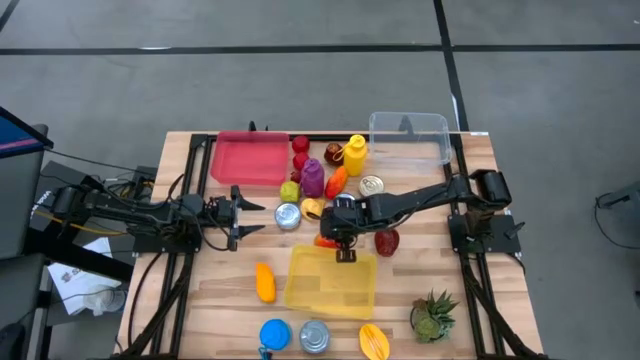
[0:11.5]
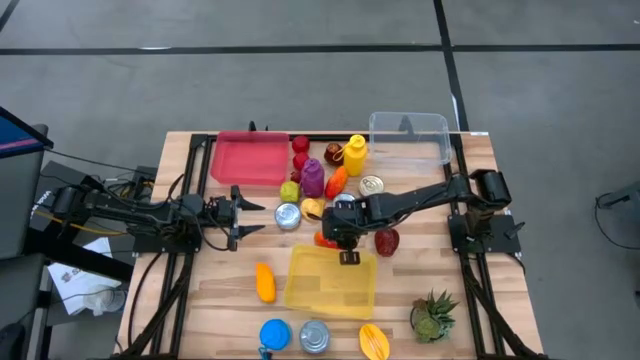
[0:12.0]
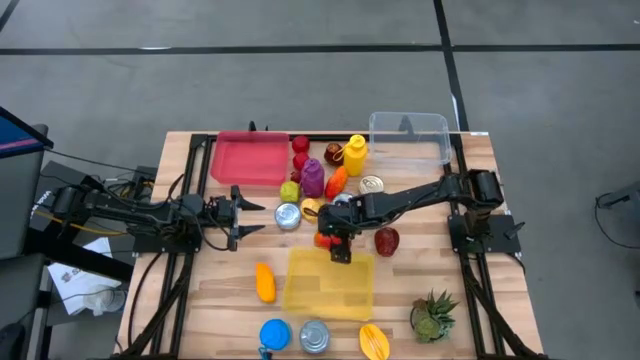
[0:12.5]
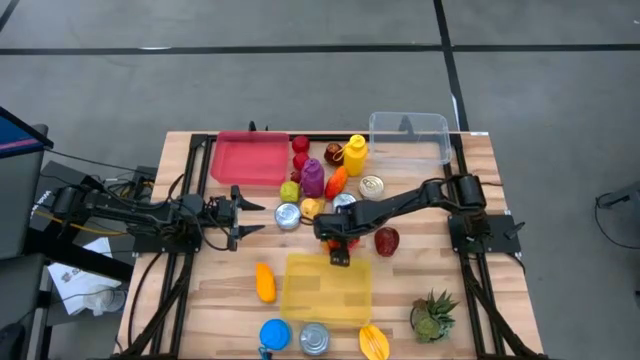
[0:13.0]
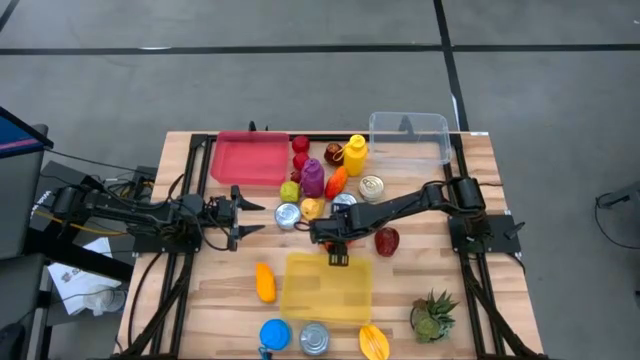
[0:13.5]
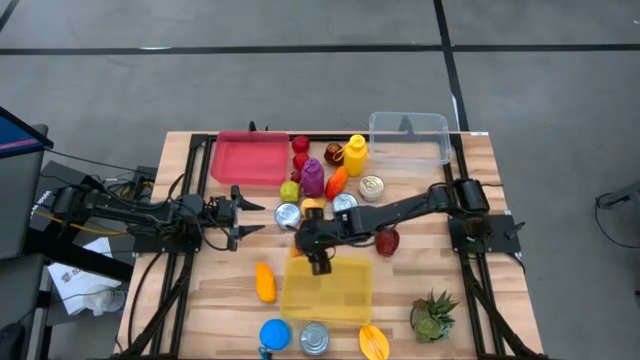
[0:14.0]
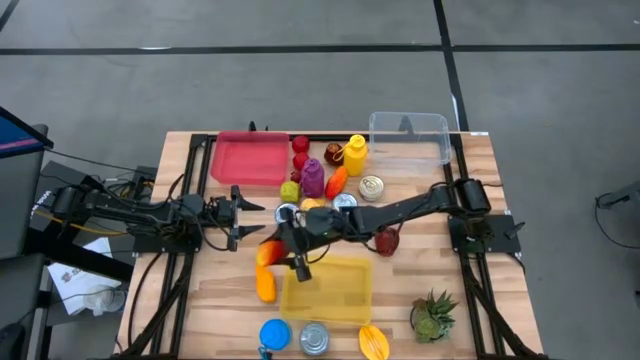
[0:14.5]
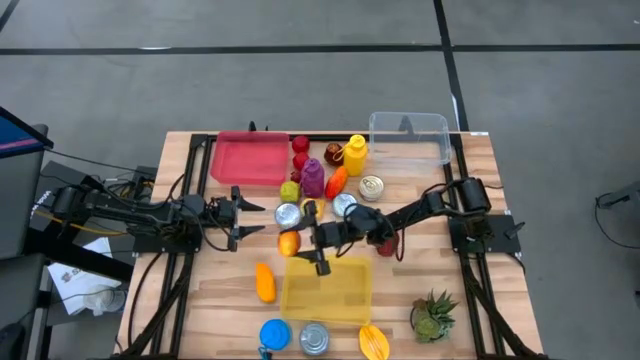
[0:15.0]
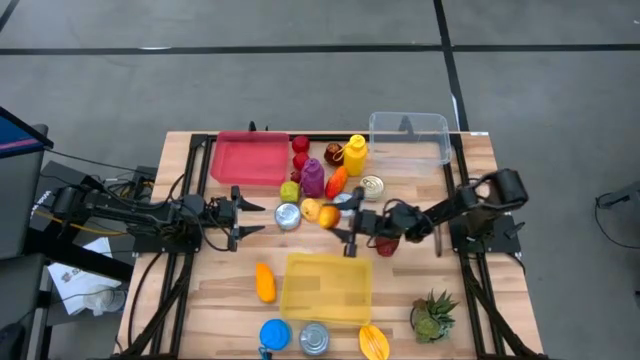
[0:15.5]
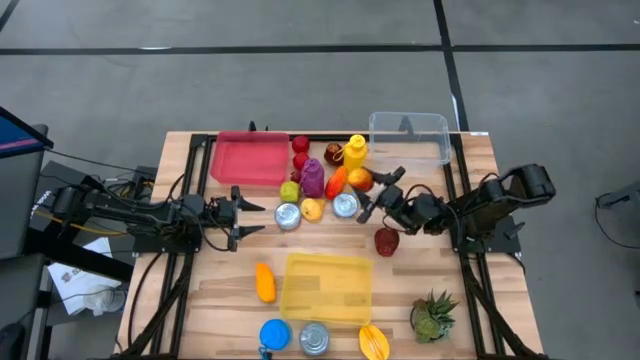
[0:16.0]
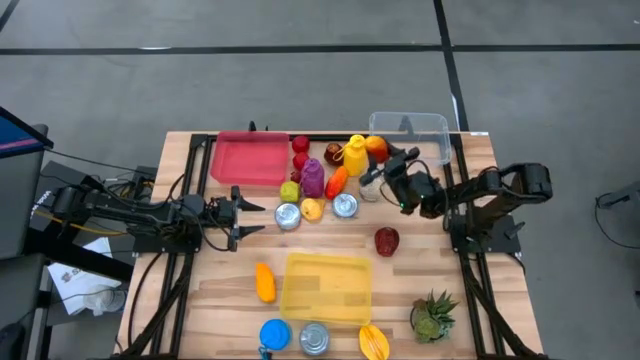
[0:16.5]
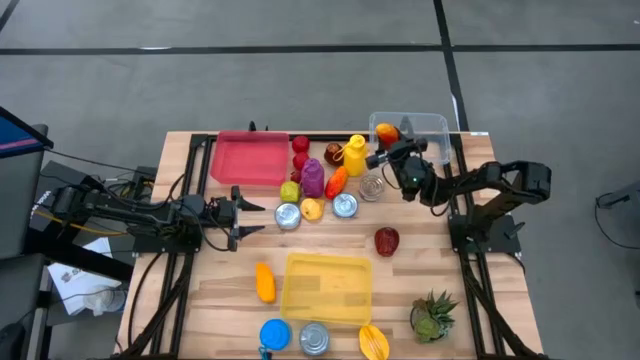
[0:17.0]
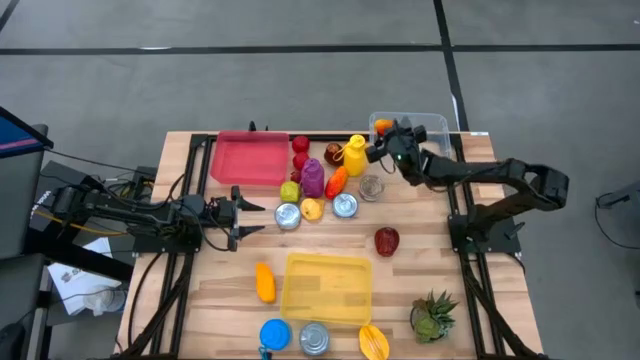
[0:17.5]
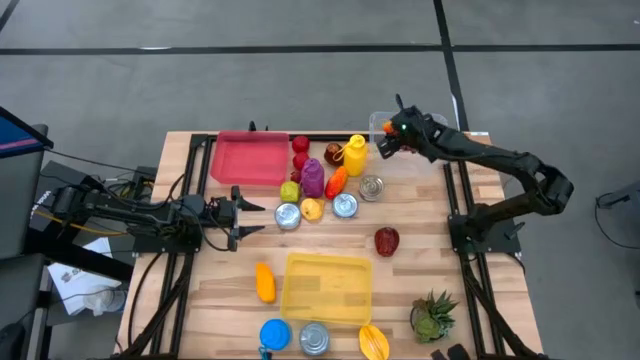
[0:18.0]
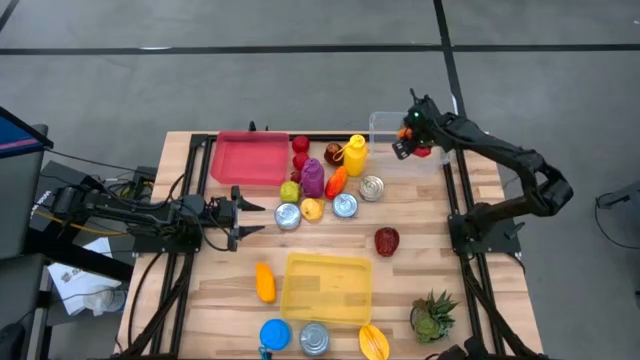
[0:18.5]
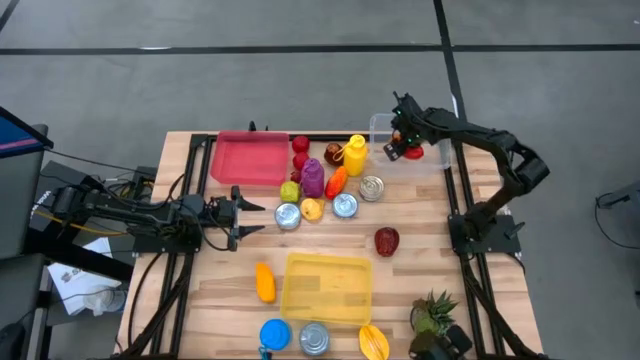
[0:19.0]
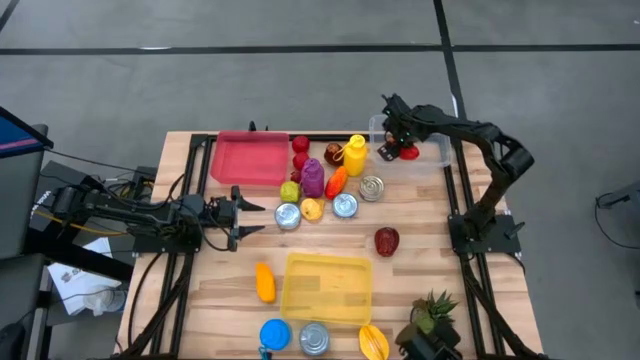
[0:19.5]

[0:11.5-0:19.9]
Task: Pick & Place Food Item
Put the middle mango into the transparent bin

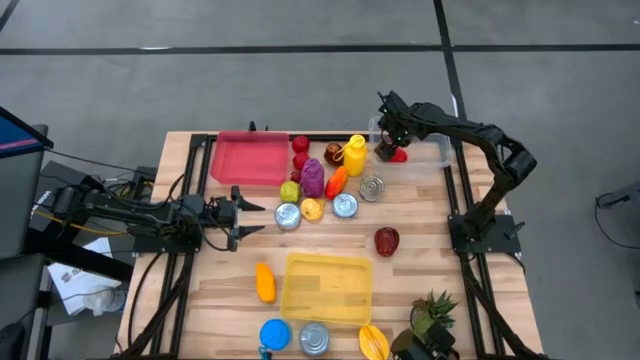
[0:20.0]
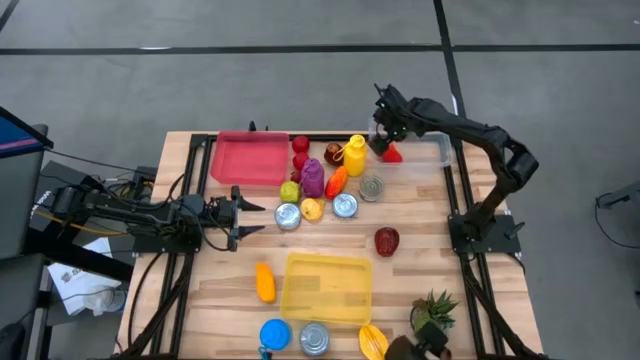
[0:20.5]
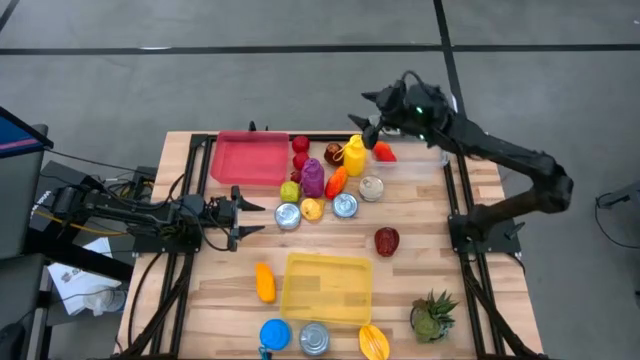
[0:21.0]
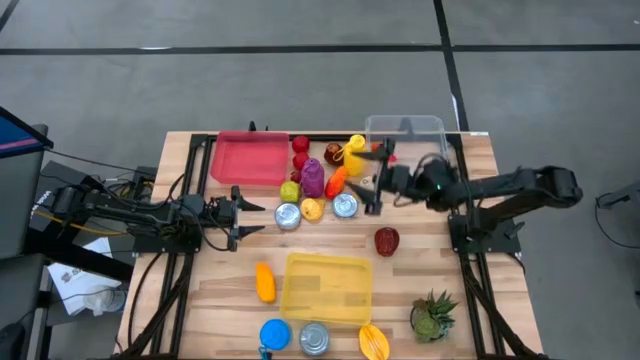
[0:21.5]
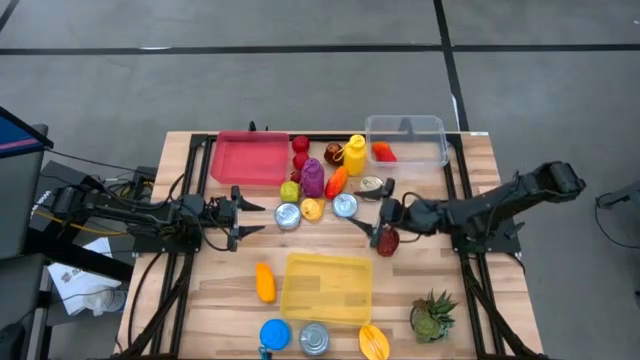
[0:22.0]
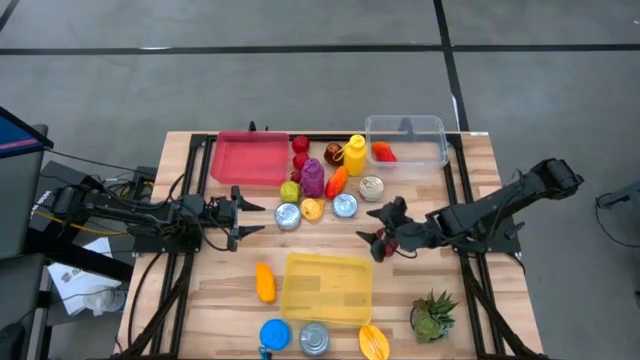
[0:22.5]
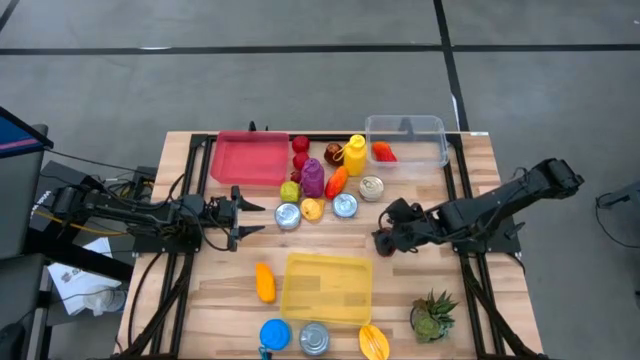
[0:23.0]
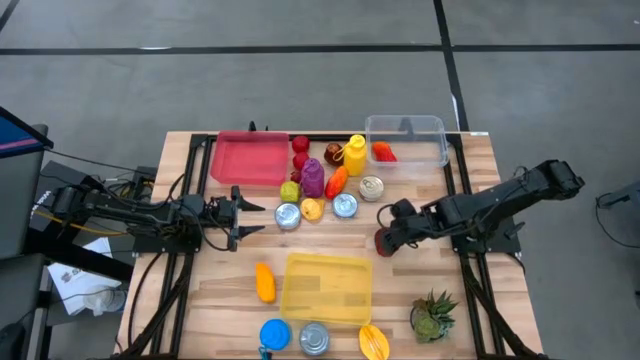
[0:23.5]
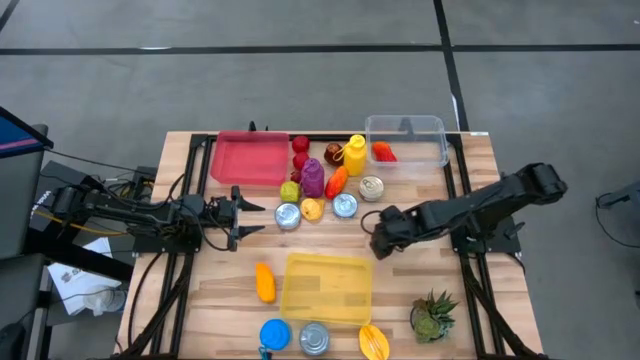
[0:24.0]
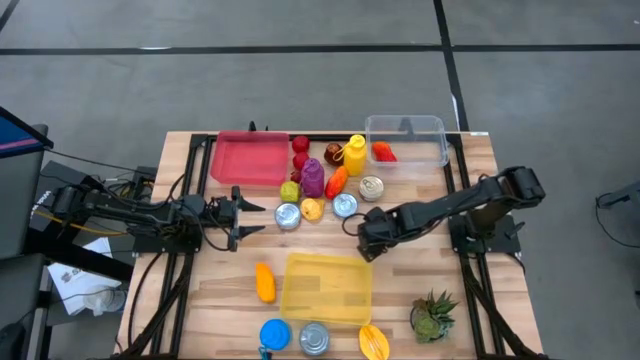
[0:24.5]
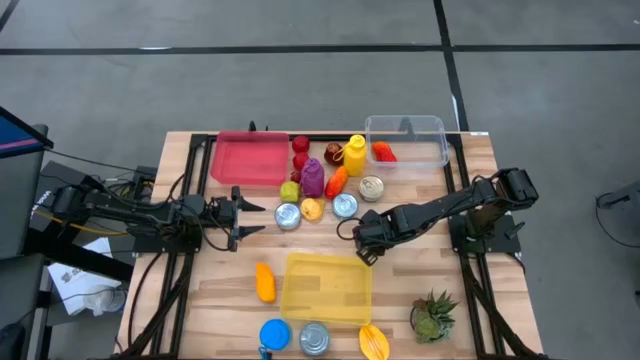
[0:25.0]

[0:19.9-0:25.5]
Put the bottom dark red apple into the transparent bin

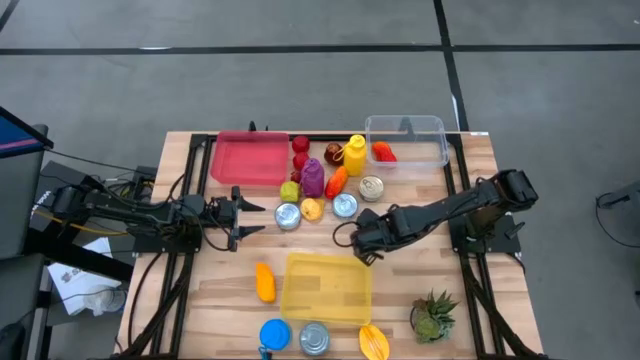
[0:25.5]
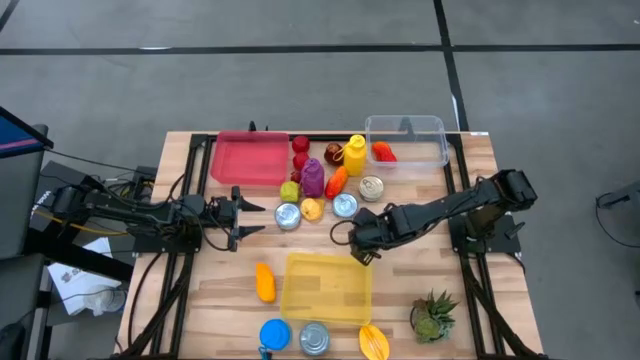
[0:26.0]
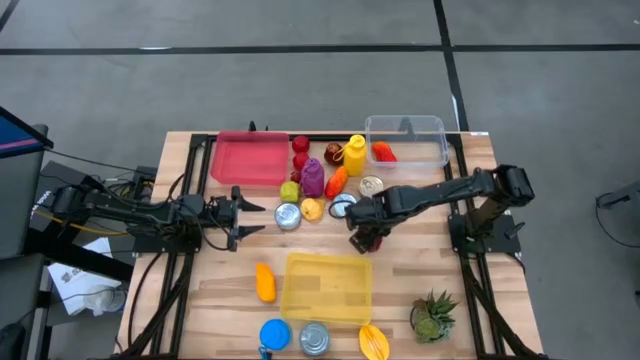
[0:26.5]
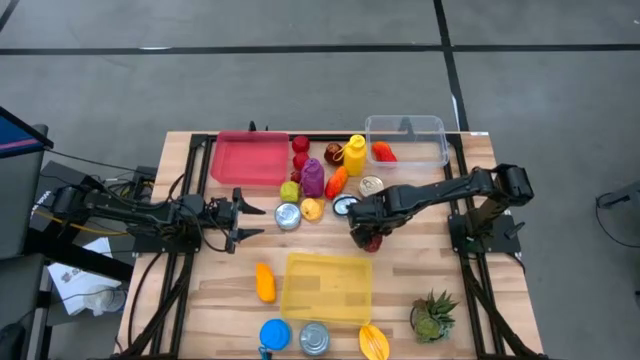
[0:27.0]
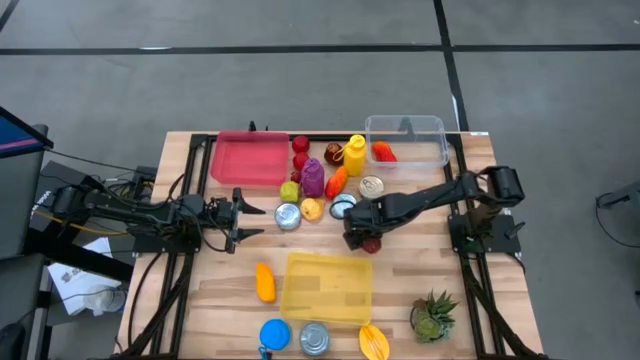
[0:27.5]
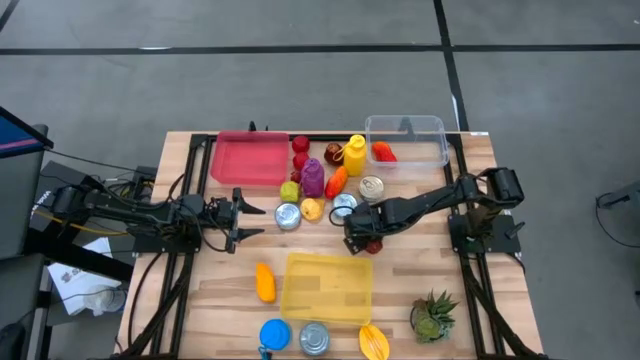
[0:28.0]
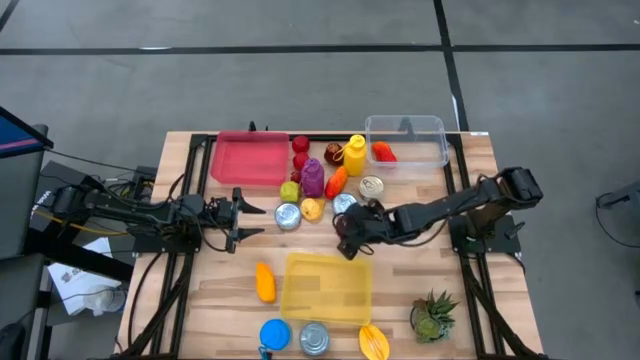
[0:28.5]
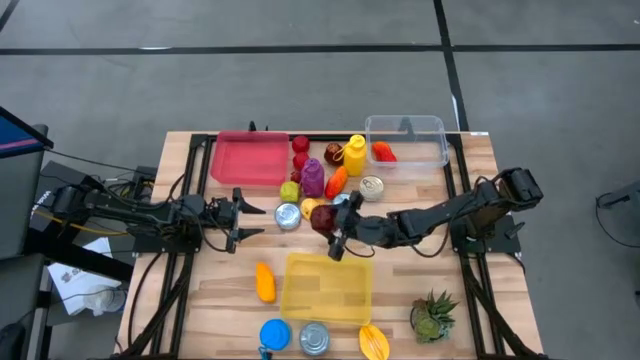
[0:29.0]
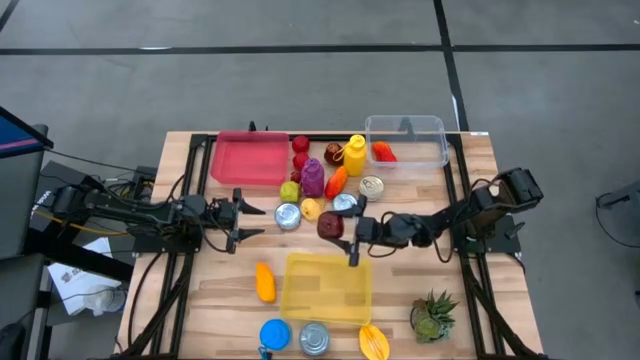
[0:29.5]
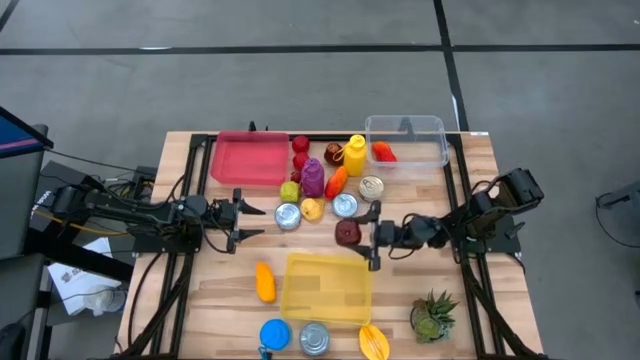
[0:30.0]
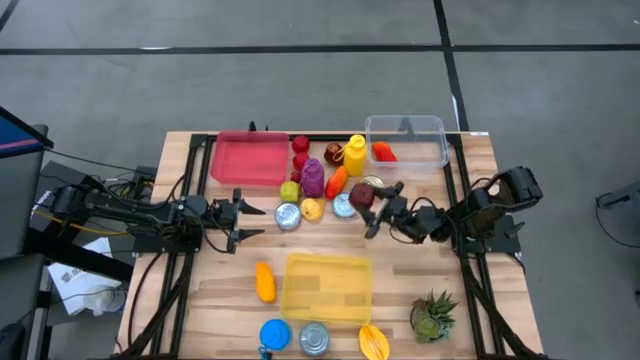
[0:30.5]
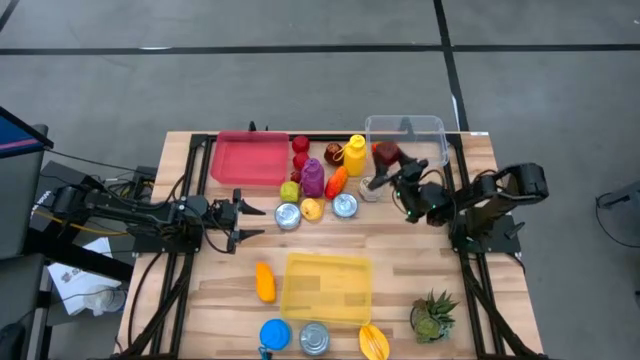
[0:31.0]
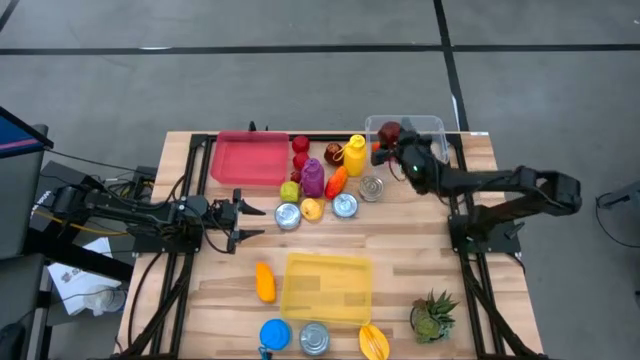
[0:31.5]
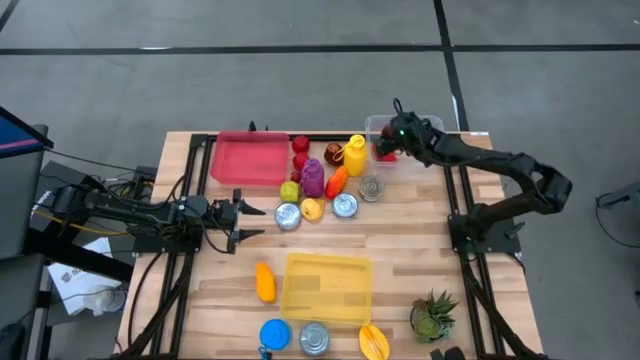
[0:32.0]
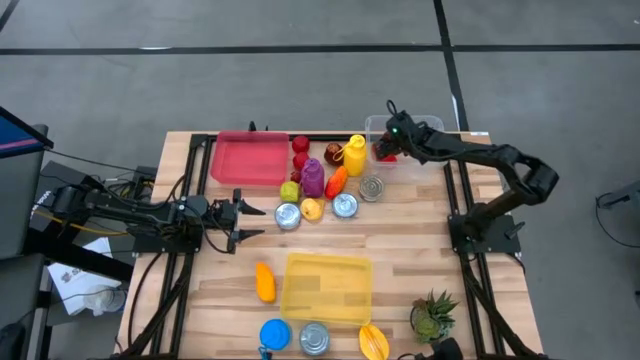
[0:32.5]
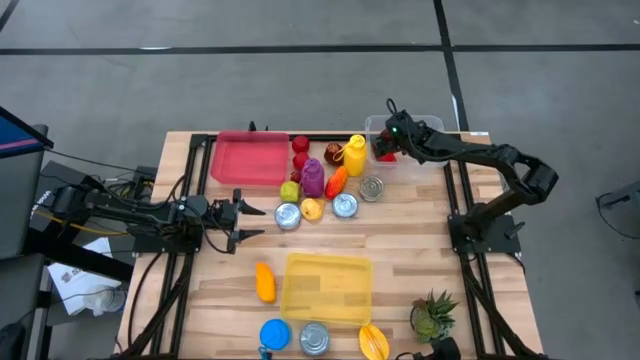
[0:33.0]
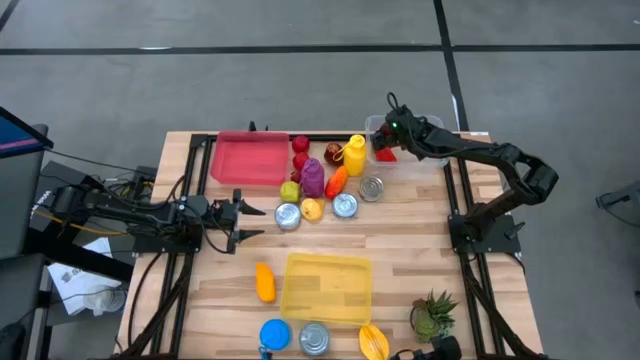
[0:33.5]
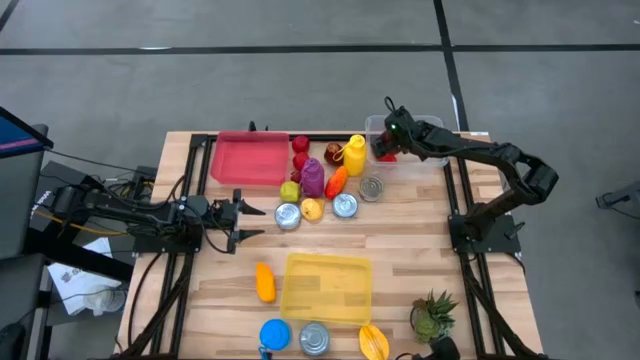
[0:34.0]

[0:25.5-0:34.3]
Put the bottom dark red apple into the transparent bin
